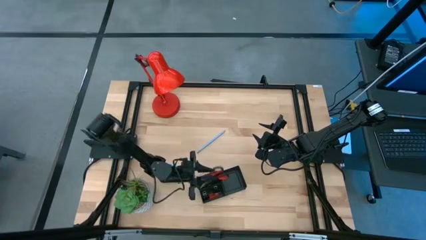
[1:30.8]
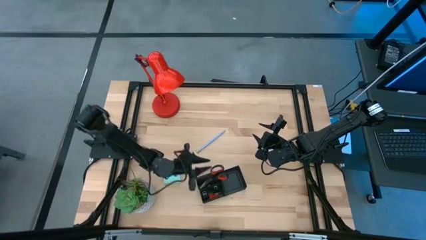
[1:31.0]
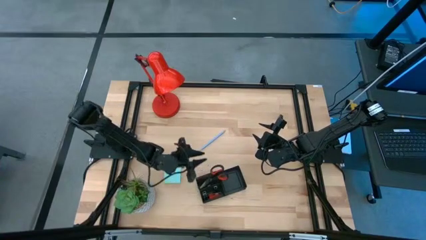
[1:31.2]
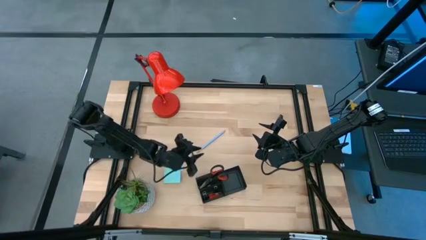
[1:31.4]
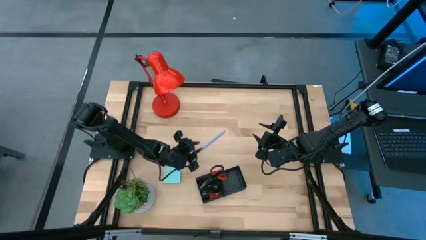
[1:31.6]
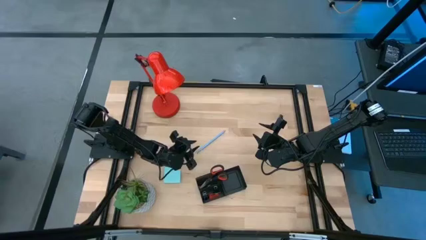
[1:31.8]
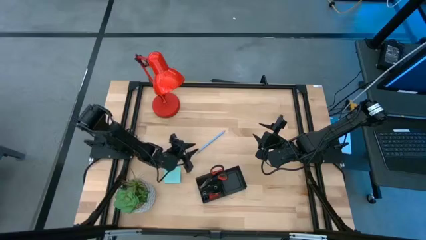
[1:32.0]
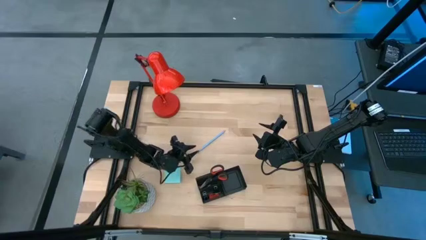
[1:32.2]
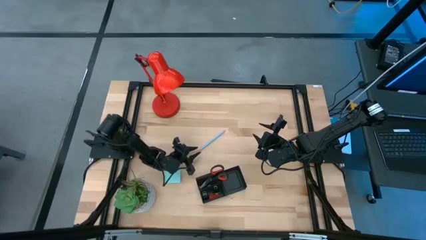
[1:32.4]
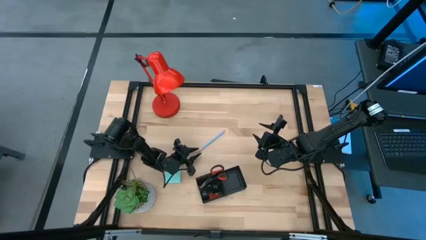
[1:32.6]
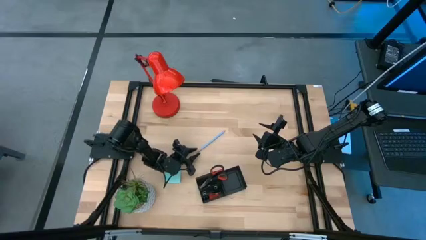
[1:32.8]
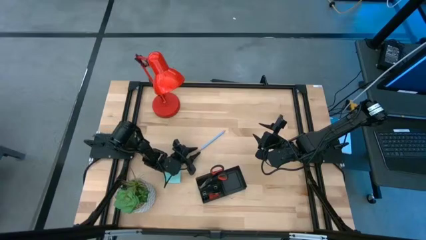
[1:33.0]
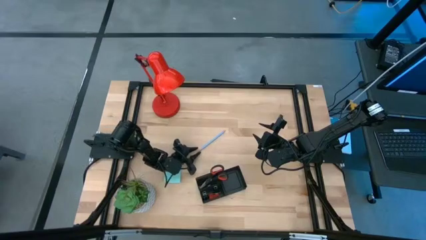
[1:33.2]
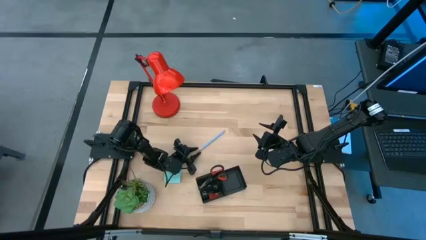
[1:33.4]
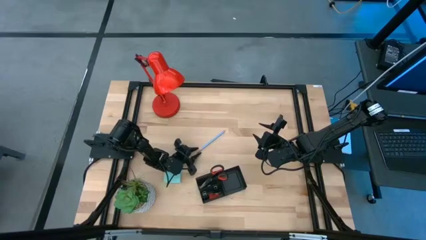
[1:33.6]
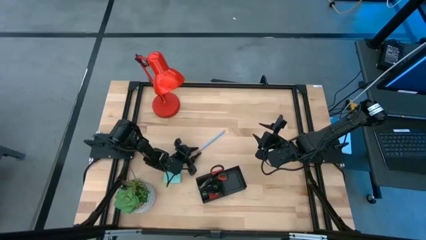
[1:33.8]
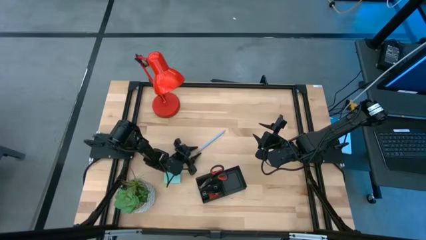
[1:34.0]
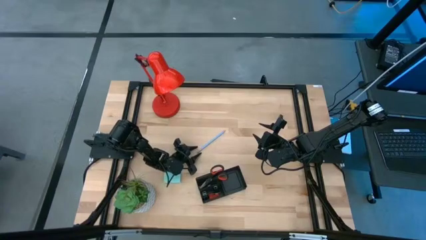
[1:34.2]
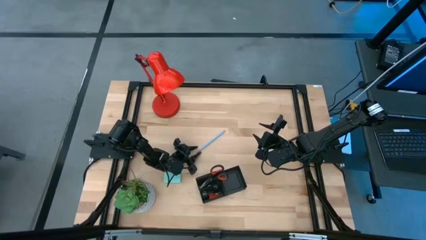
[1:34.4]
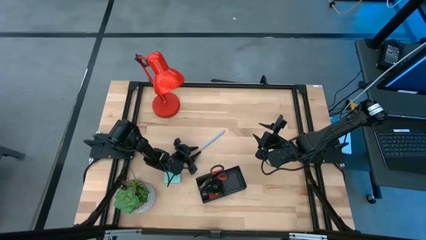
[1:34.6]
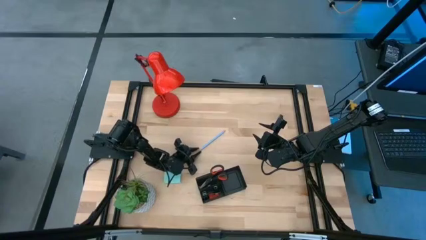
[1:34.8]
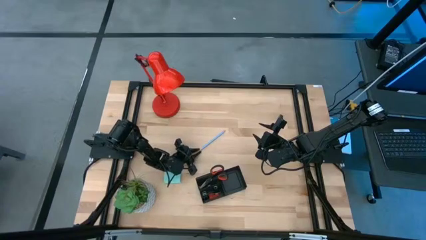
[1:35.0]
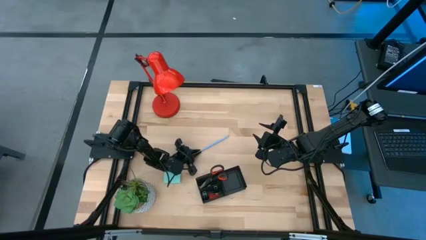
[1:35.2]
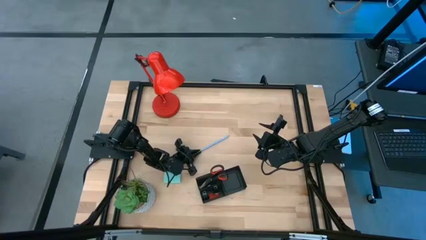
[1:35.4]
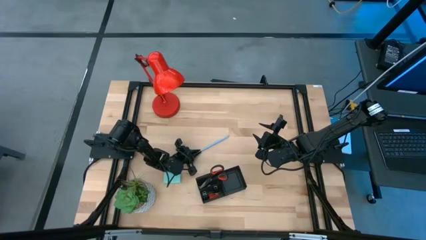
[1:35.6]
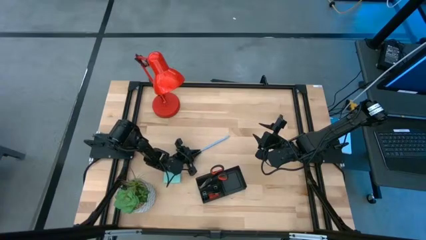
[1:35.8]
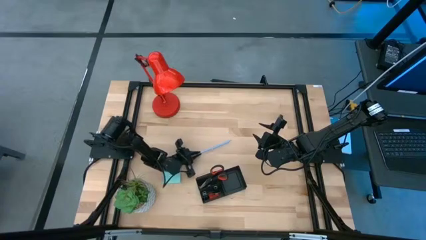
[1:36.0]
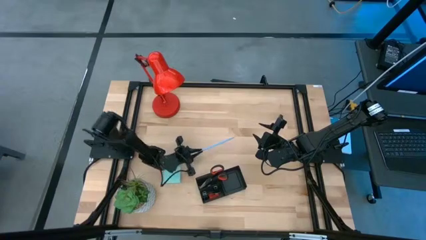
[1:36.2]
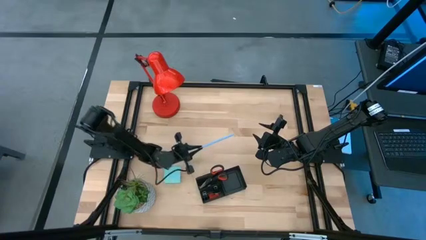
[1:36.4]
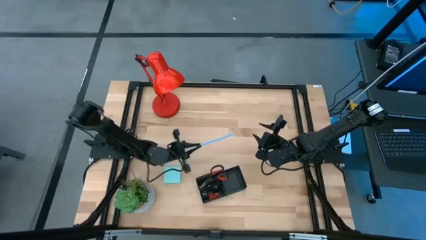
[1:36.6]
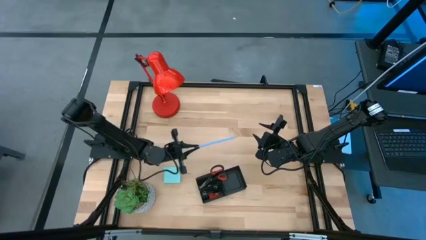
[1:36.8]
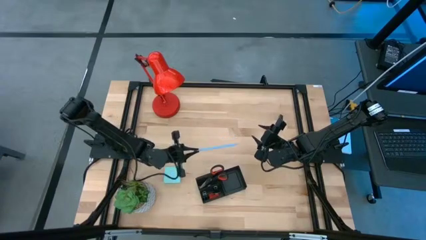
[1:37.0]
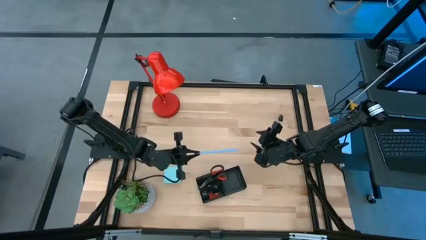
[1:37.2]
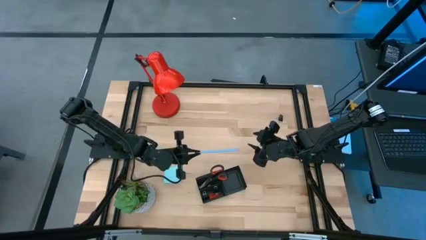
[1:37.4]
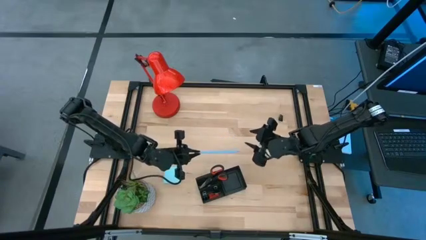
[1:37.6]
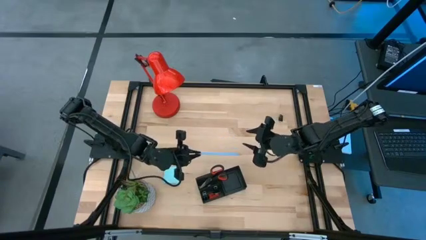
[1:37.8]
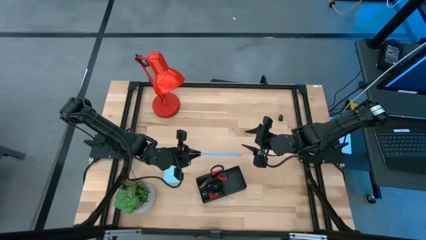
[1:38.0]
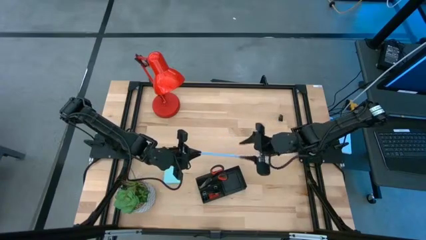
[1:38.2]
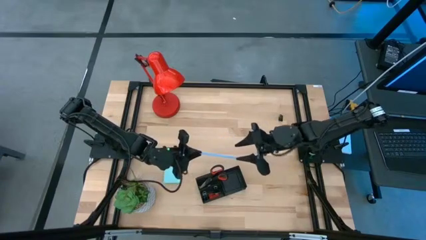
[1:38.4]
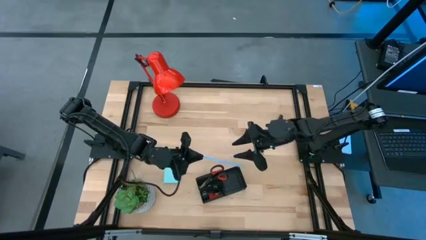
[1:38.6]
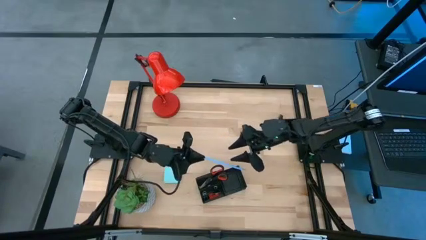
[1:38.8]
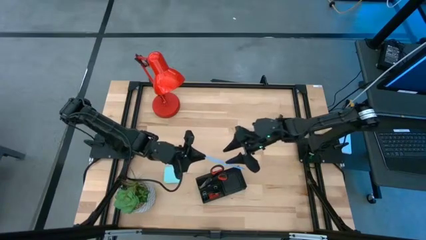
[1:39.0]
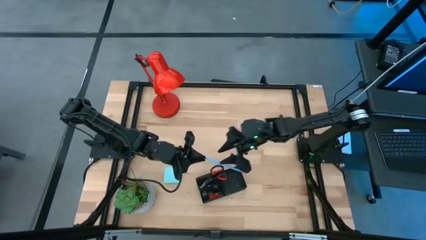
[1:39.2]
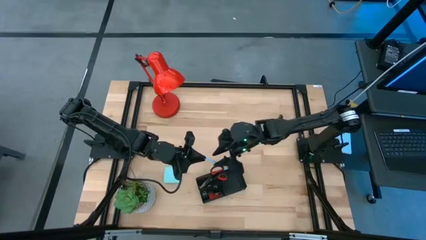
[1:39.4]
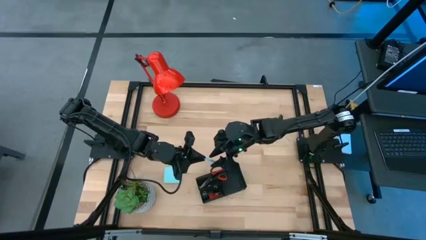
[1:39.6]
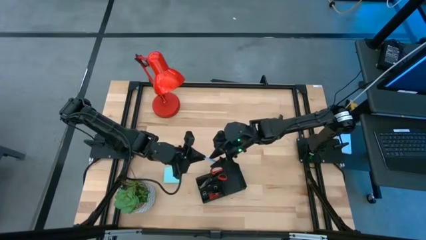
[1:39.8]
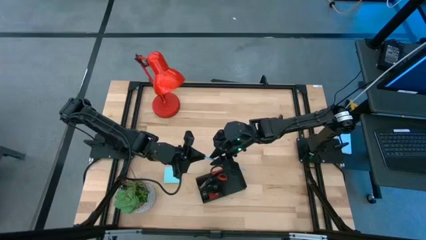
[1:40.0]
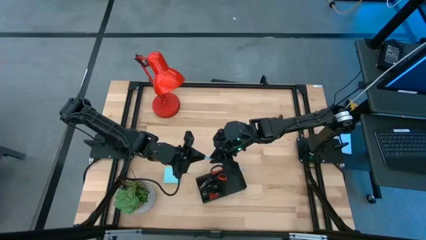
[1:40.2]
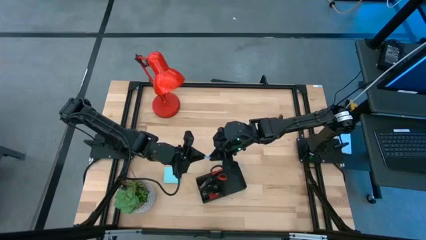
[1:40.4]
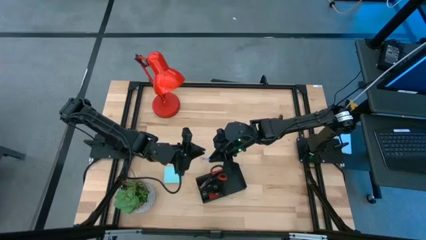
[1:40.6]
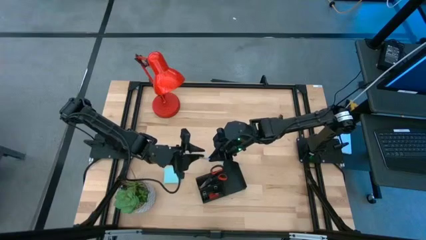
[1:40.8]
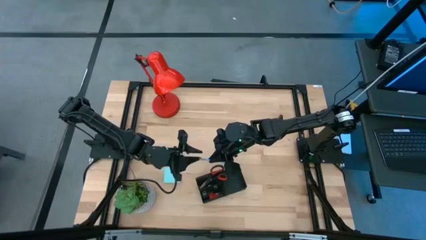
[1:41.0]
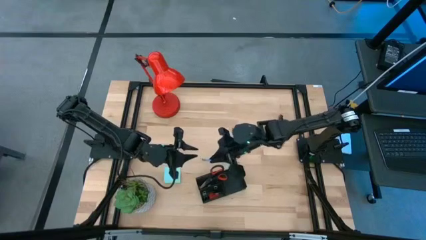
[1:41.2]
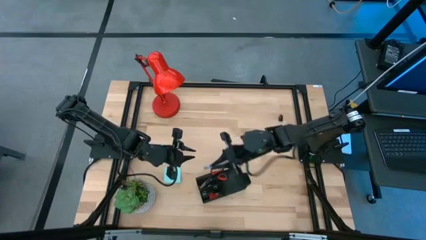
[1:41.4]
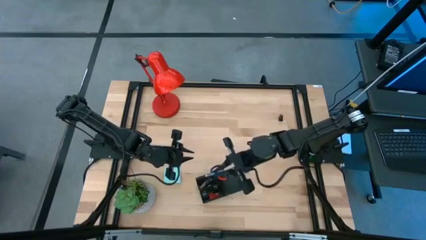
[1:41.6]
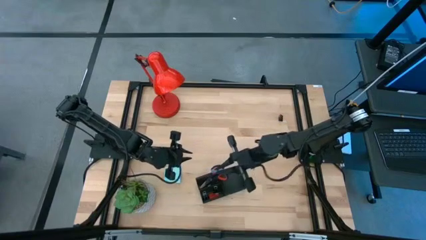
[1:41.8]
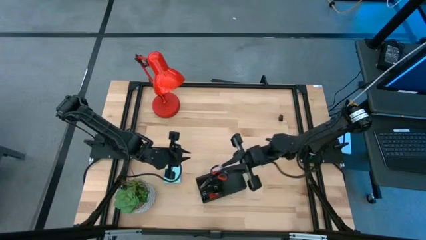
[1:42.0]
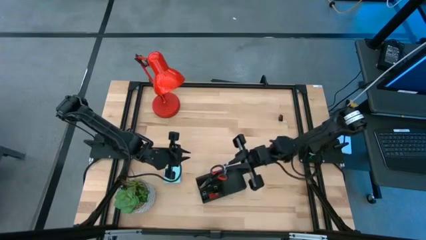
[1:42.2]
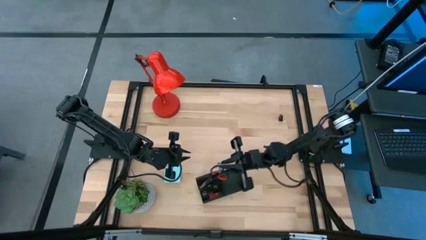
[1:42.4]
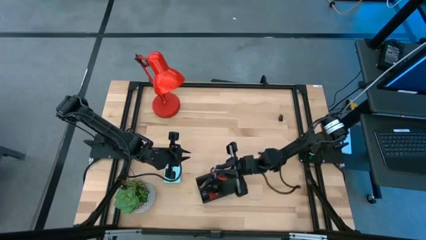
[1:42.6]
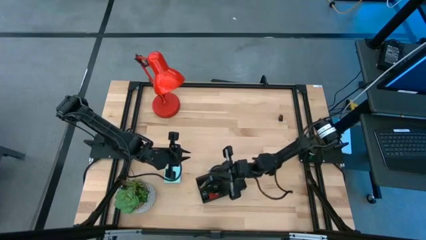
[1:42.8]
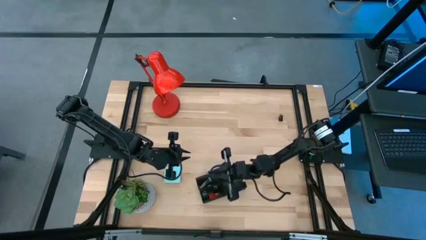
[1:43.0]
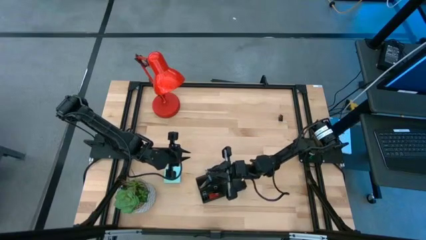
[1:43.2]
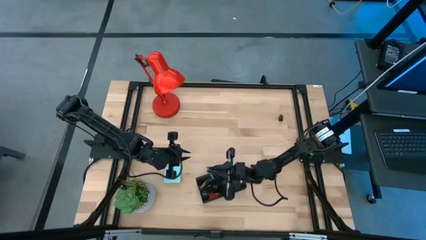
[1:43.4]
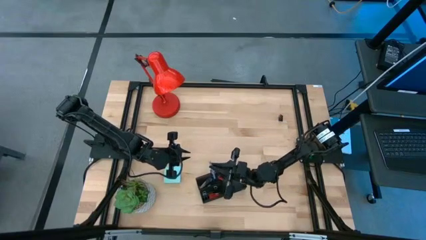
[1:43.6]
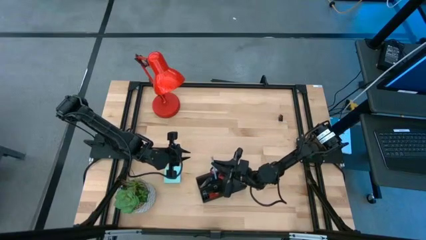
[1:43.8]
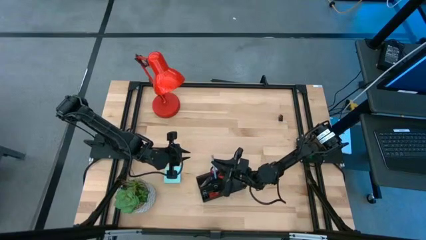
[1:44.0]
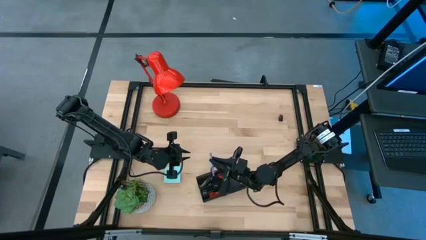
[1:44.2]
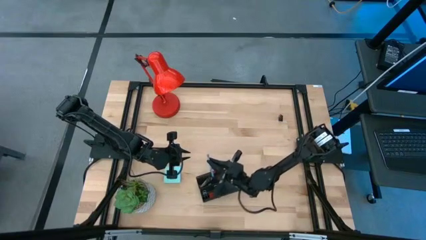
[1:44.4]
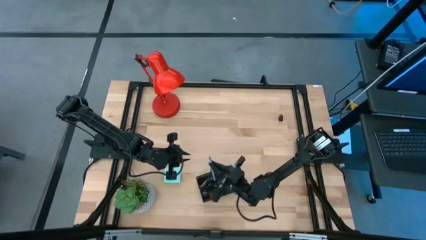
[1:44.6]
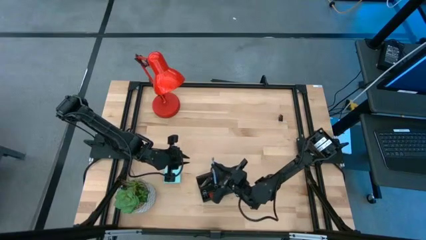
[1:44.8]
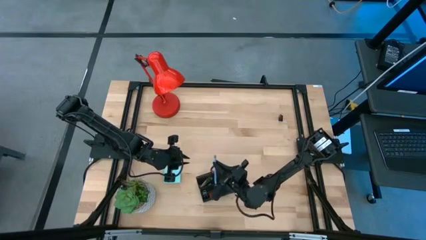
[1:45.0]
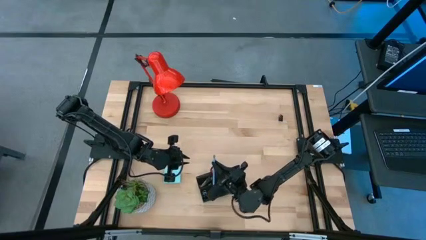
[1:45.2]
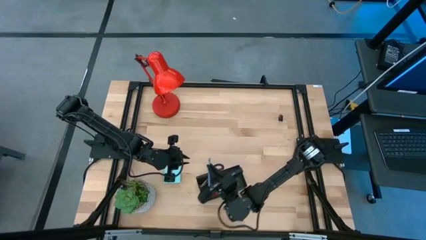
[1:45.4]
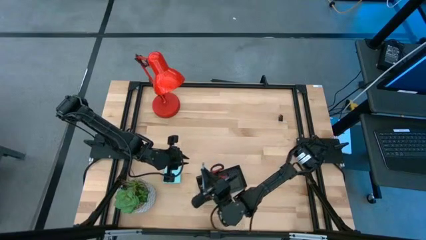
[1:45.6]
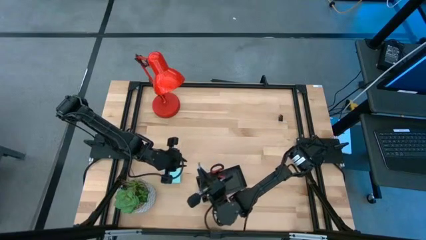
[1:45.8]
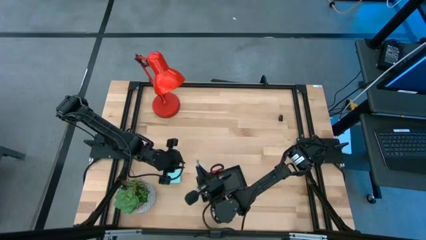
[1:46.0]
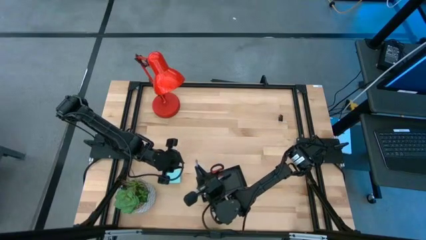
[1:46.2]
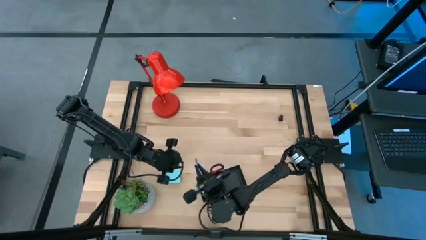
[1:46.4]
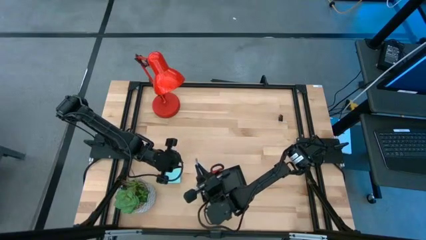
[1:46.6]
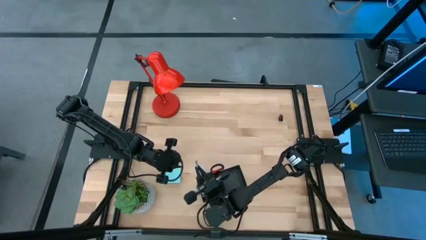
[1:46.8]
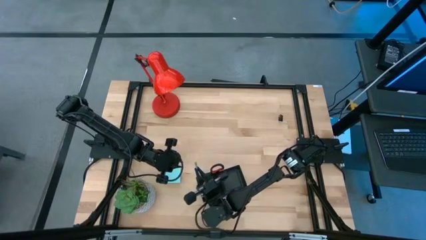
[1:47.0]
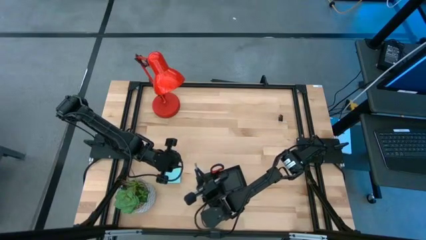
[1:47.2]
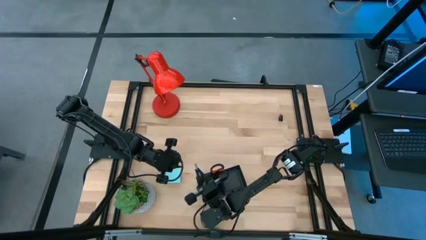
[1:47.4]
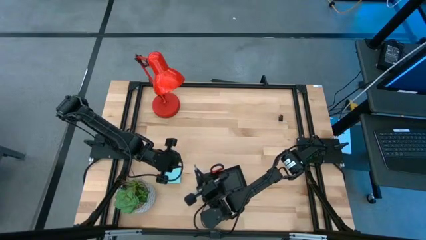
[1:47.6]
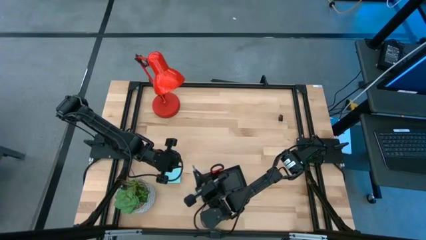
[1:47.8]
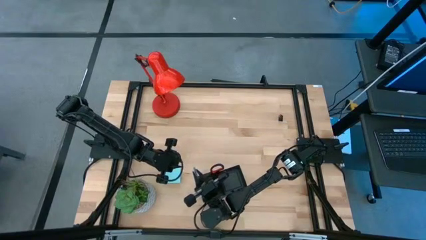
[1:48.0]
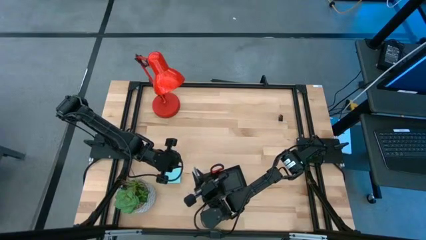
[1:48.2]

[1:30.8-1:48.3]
Task: Pick and place office supplies into organizer
Put the blue pencil into the black desk organizer
